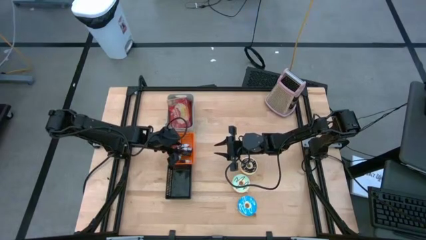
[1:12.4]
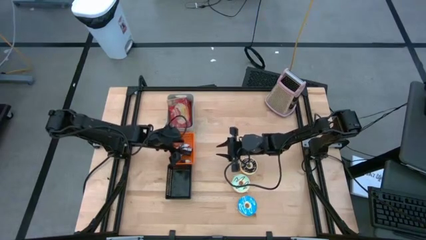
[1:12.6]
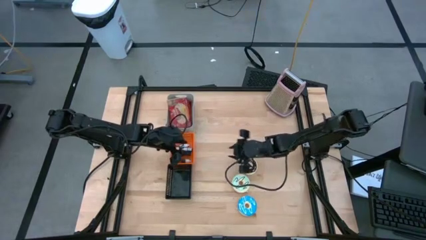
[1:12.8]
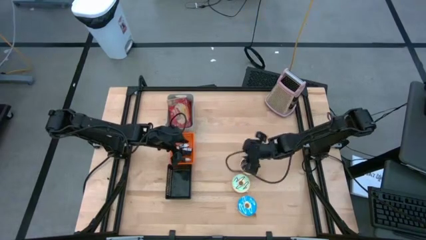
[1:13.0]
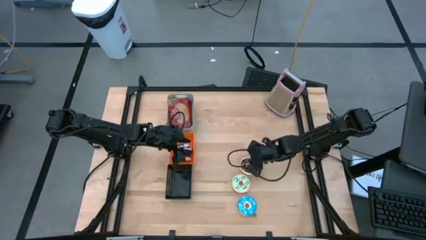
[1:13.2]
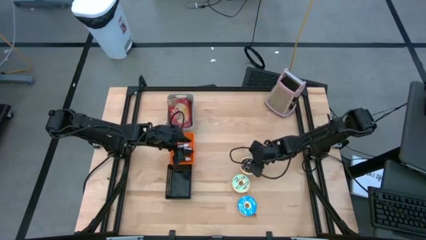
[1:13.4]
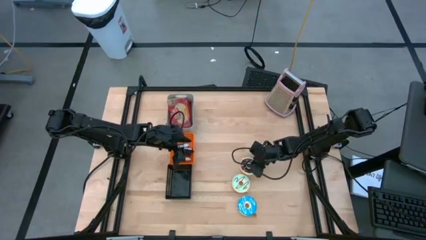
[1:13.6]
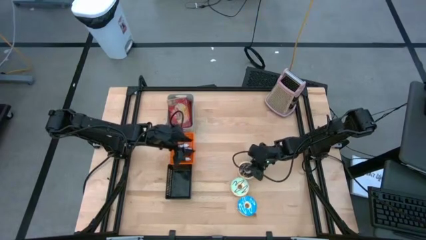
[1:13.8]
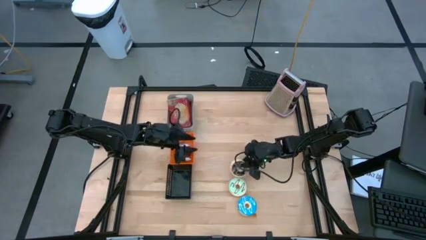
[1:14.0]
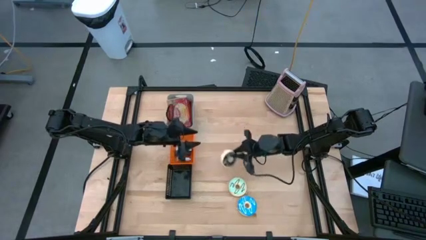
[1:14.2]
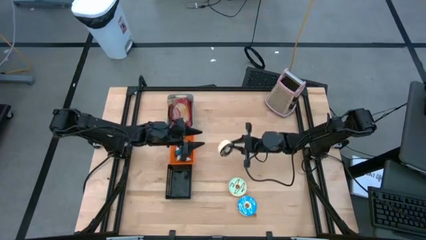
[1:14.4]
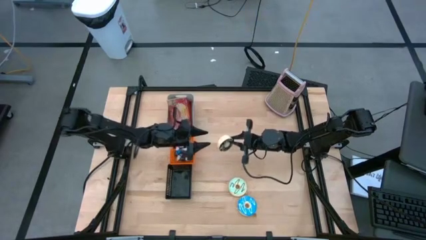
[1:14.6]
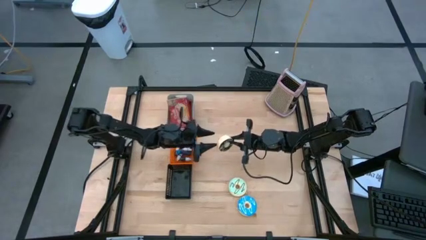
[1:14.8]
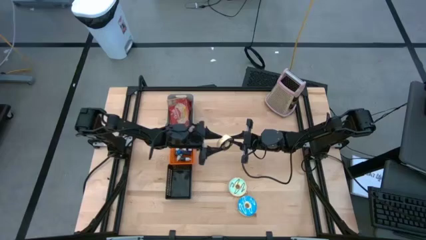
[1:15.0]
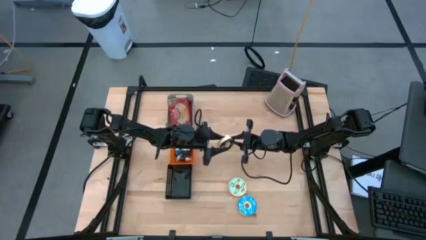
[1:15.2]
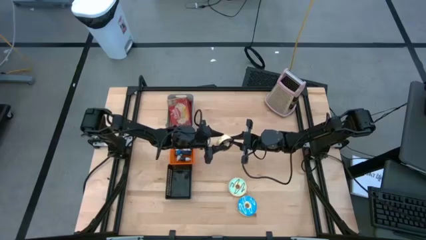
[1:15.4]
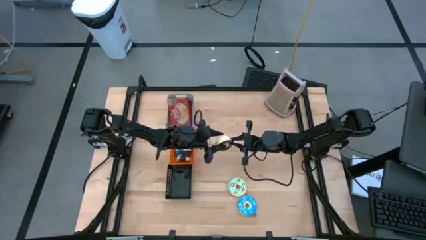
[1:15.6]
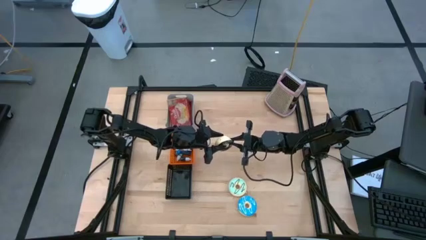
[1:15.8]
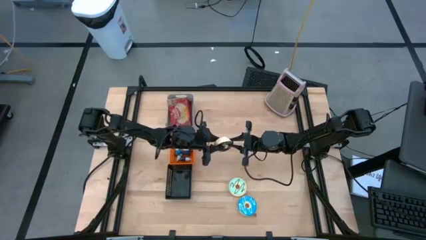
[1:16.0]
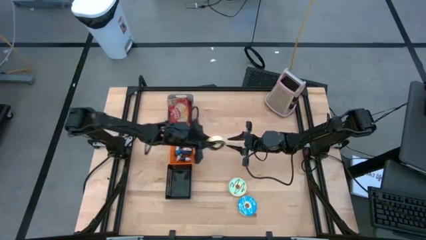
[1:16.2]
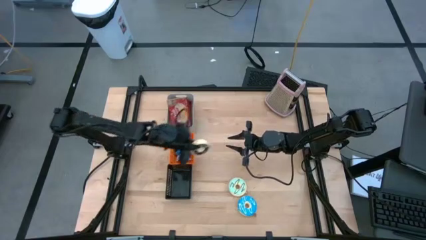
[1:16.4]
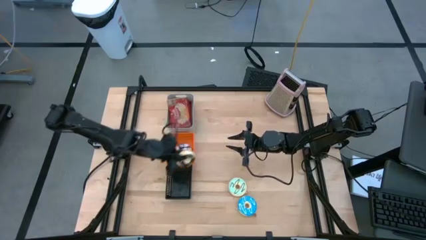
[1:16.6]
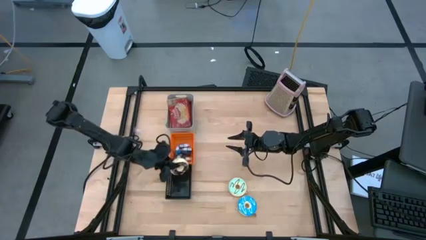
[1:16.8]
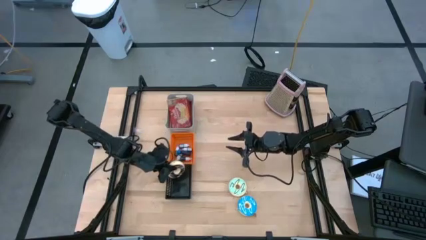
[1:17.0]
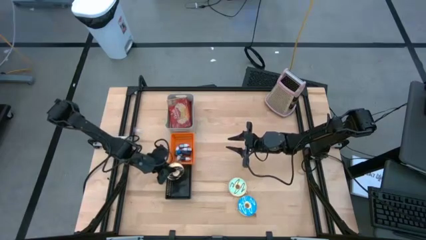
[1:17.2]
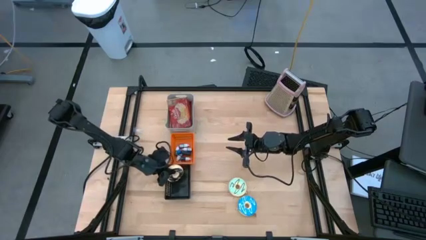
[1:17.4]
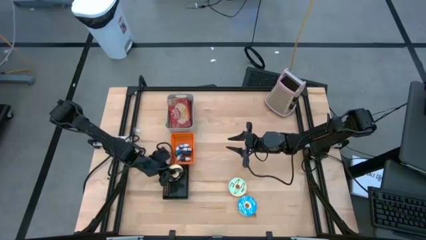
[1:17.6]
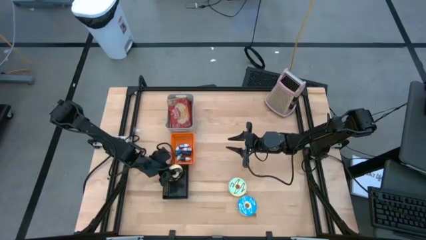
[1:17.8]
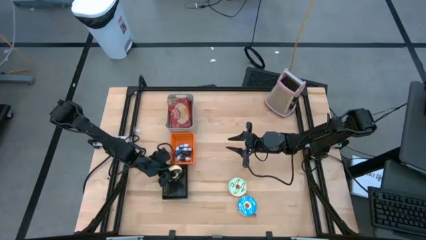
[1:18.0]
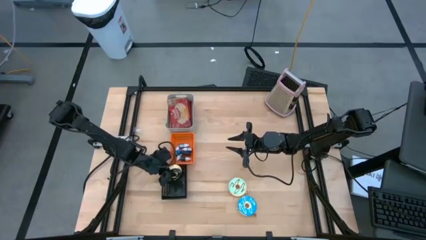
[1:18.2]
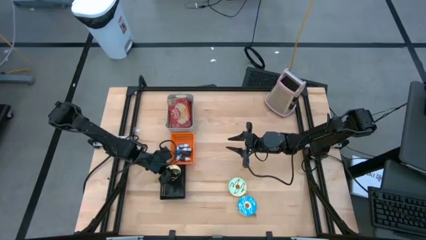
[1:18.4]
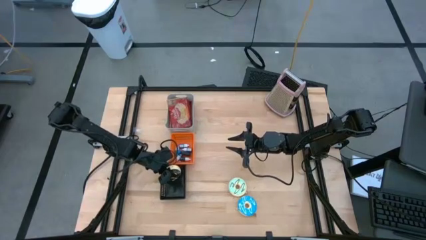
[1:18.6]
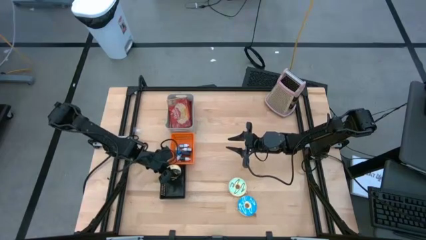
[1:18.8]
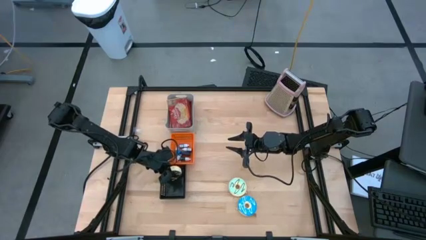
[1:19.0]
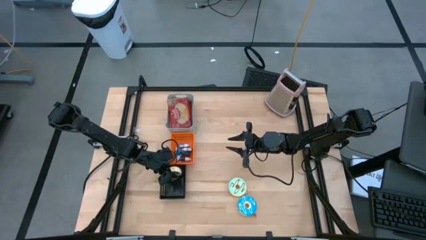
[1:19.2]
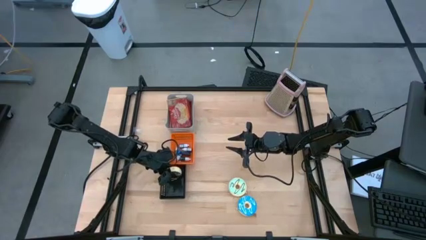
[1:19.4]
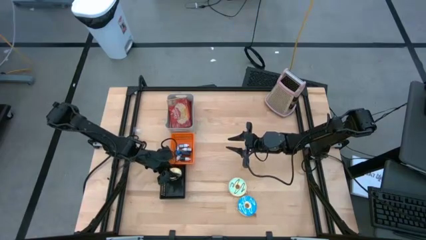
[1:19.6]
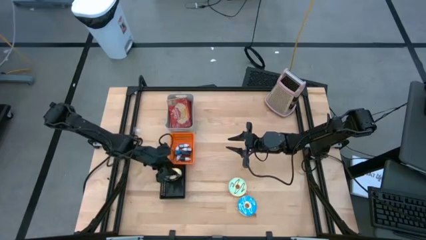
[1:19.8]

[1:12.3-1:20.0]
Put the black donut into the black bin

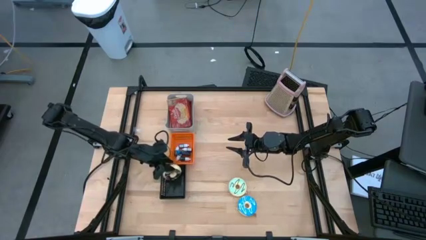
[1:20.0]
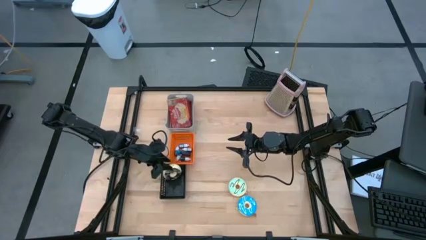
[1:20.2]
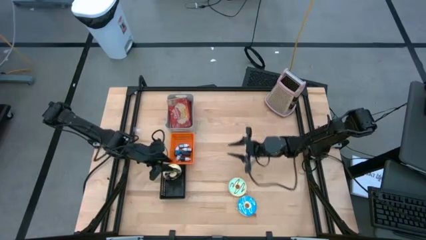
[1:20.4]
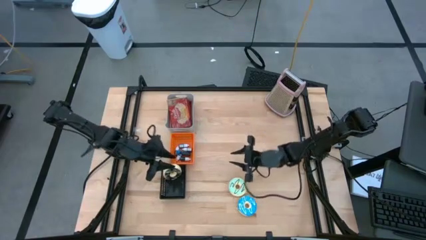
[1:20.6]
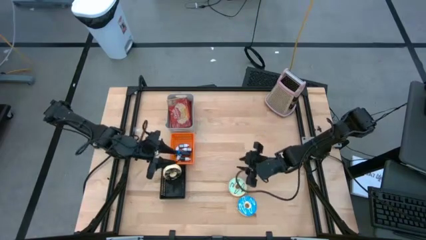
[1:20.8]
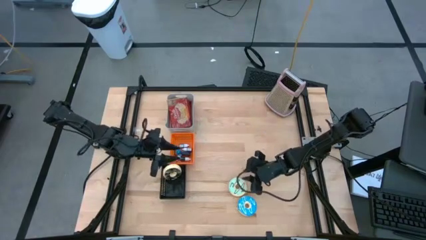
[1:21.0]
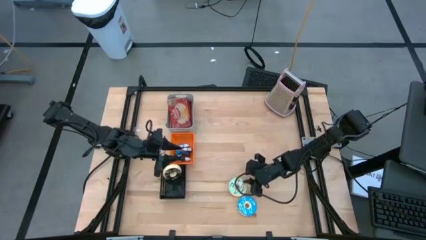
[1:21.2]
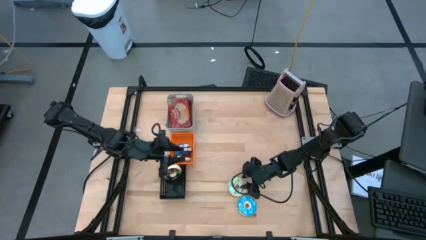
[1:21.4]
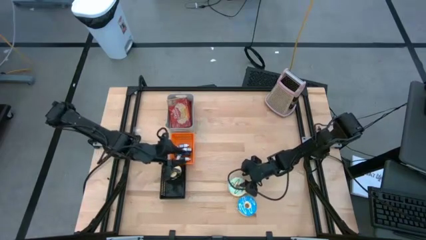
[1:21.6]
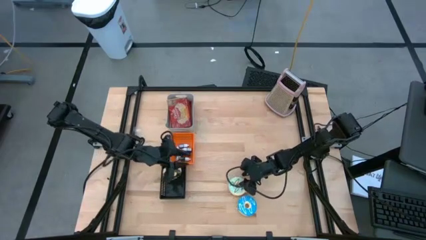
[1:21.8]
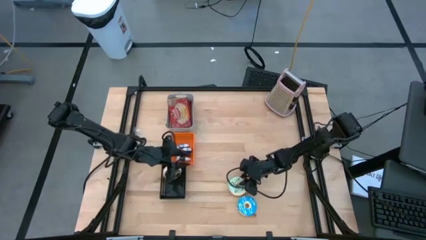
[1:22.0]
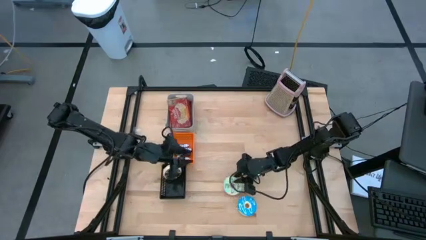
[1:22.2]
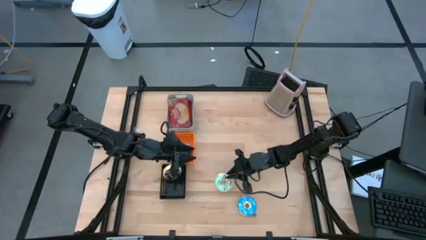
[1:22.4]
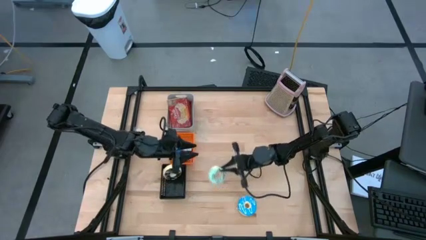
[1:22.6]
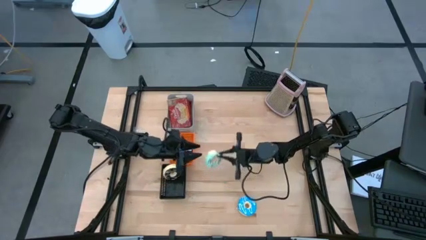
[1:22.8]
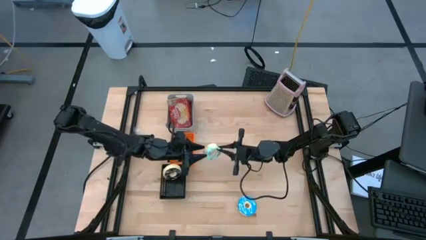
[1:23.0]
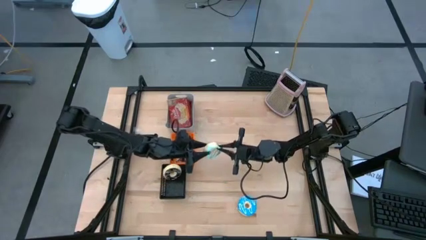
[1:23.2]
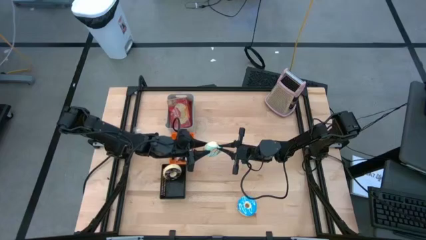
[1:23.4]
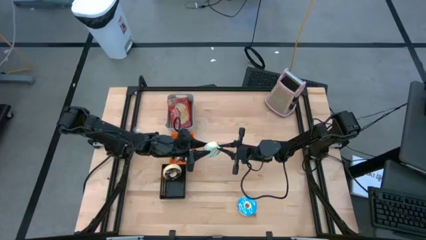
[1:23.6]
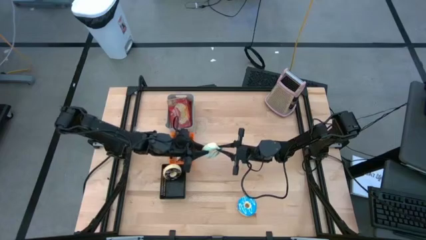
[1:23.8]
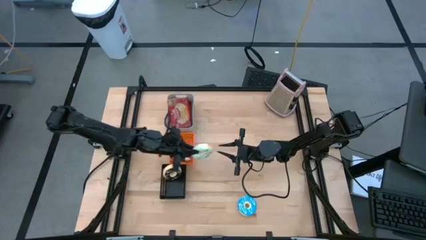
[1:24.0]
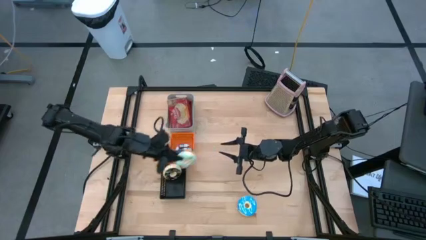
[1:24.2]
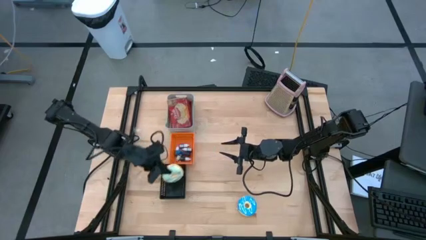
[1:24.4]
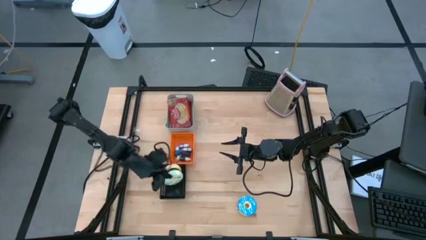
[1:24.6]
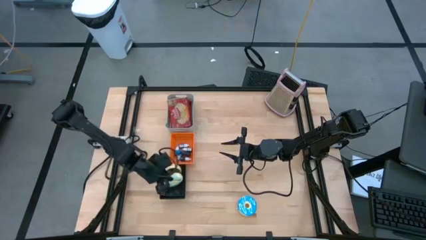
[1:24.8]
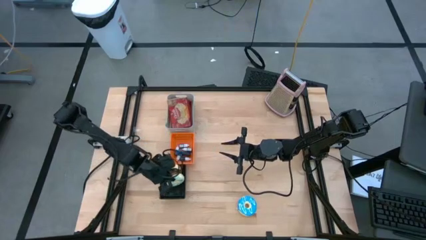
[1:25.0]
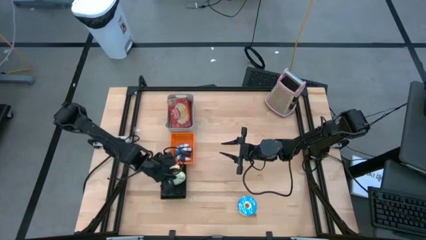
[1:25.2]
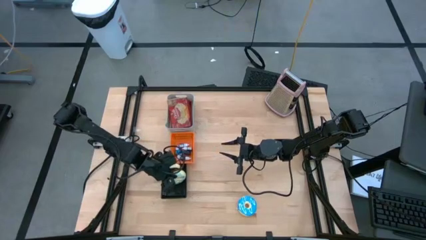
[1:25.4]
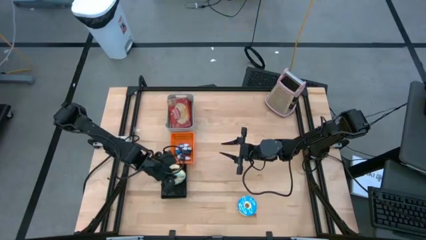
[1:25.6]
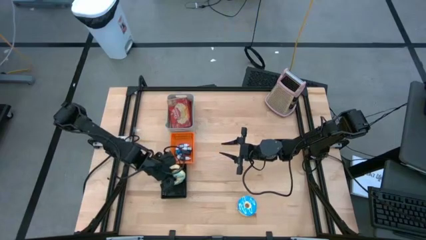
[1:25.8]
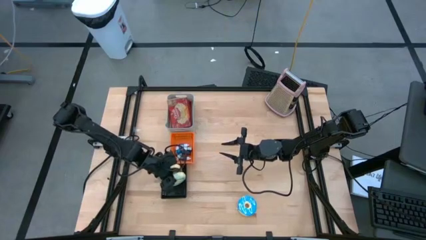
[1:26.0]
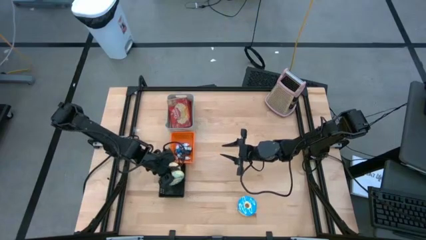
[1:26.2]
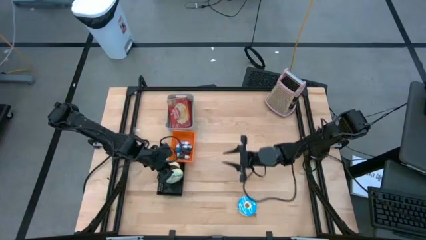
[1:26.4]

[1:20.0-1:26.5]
Put the green donut into the black bin
